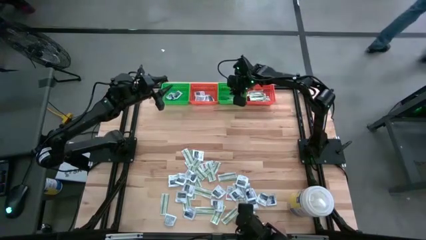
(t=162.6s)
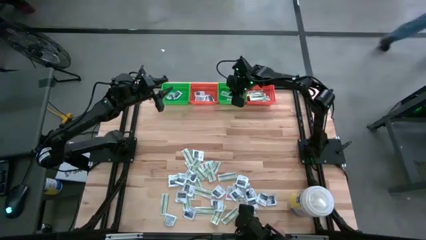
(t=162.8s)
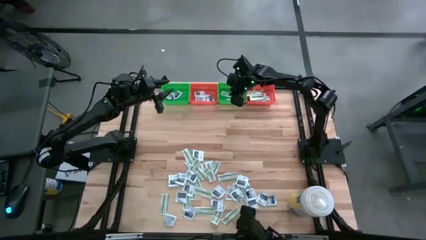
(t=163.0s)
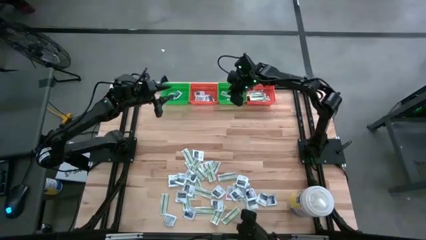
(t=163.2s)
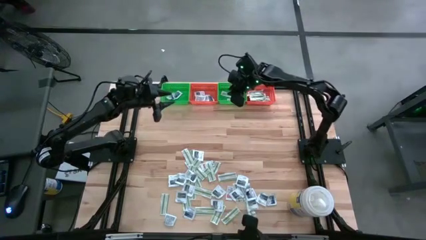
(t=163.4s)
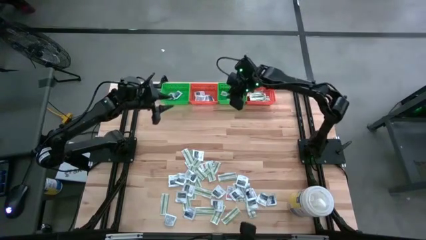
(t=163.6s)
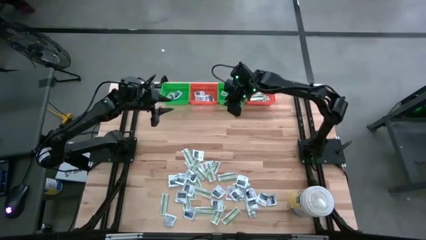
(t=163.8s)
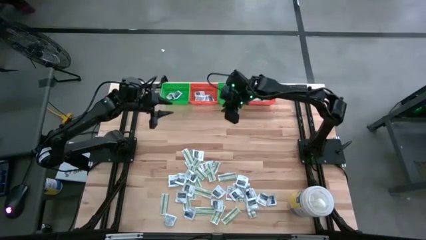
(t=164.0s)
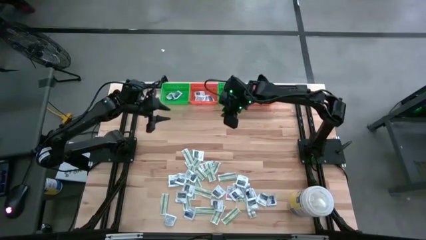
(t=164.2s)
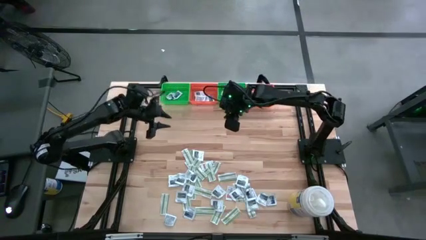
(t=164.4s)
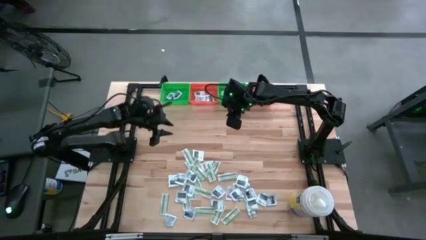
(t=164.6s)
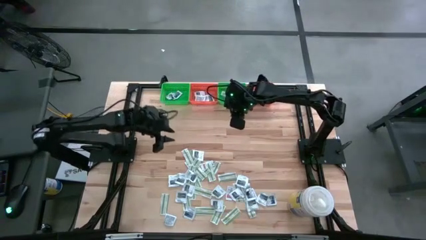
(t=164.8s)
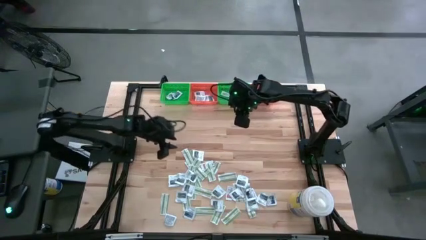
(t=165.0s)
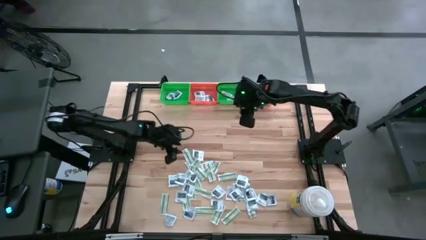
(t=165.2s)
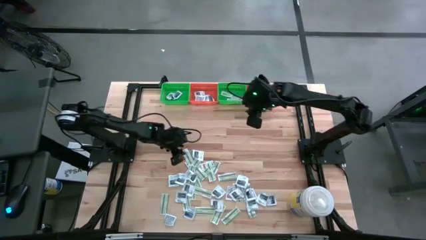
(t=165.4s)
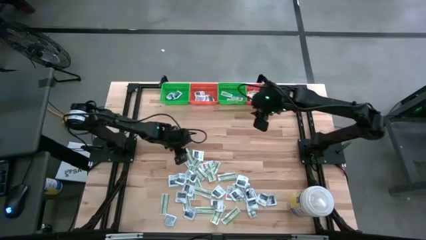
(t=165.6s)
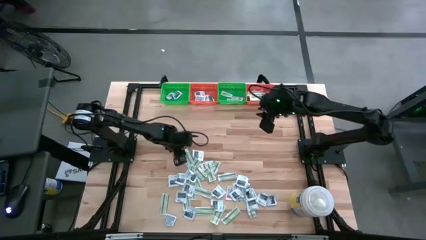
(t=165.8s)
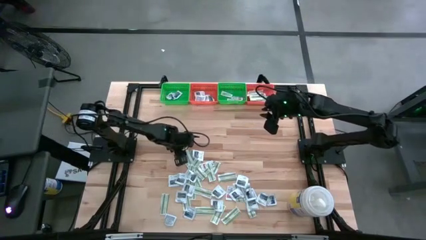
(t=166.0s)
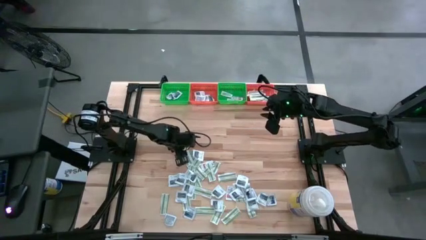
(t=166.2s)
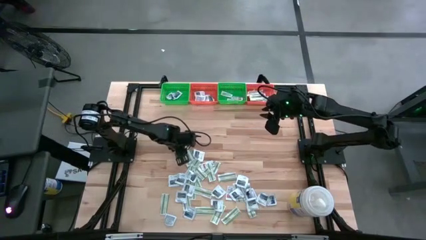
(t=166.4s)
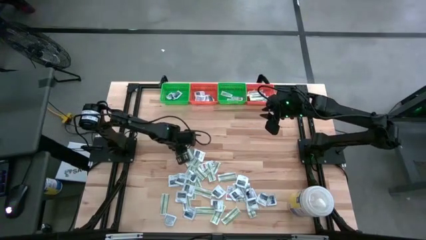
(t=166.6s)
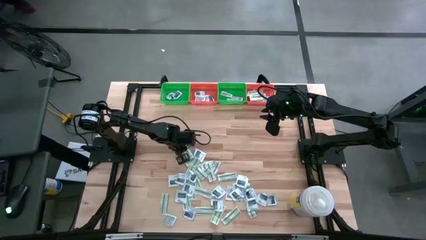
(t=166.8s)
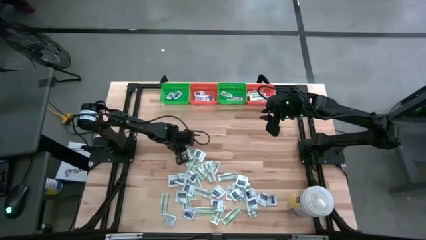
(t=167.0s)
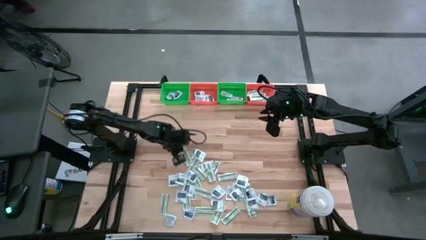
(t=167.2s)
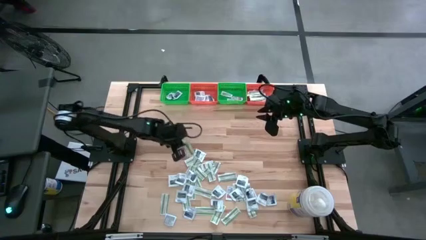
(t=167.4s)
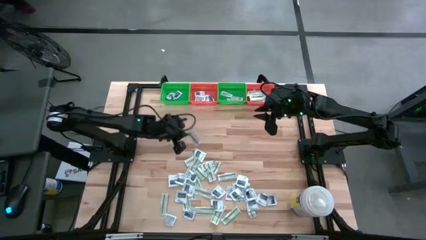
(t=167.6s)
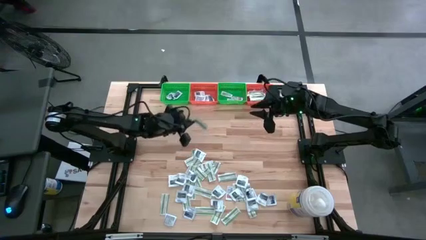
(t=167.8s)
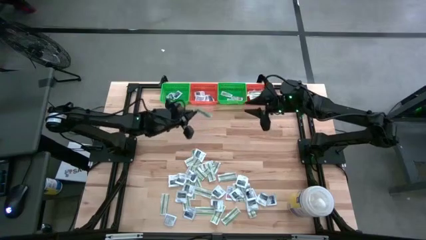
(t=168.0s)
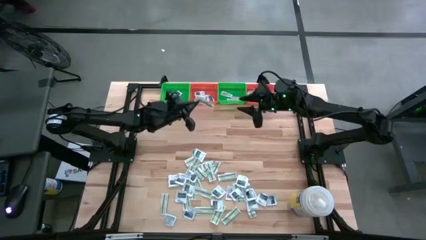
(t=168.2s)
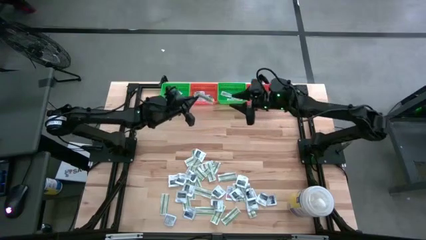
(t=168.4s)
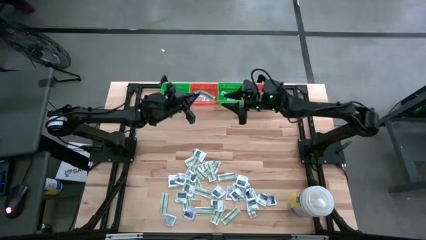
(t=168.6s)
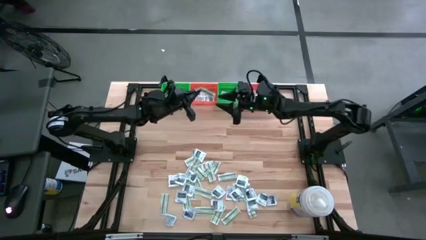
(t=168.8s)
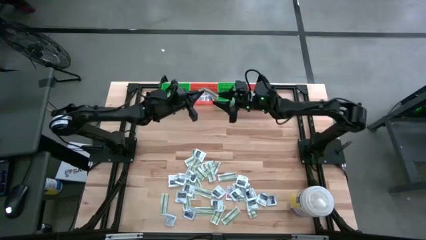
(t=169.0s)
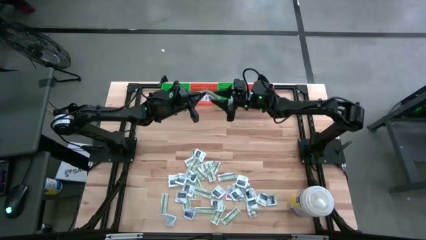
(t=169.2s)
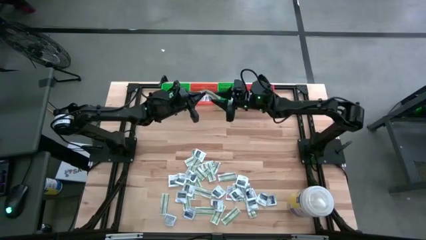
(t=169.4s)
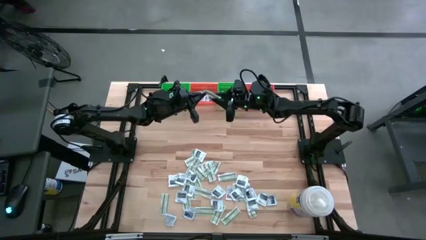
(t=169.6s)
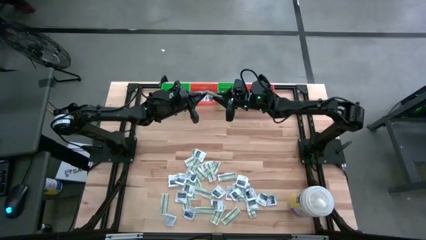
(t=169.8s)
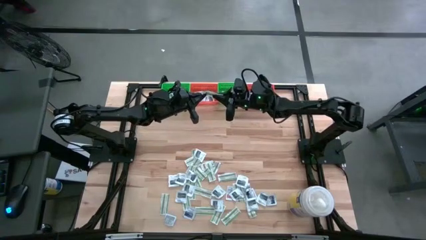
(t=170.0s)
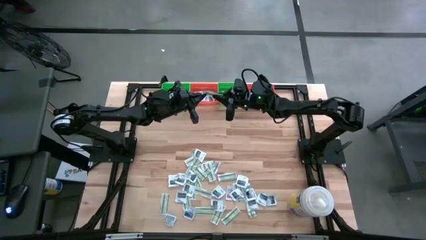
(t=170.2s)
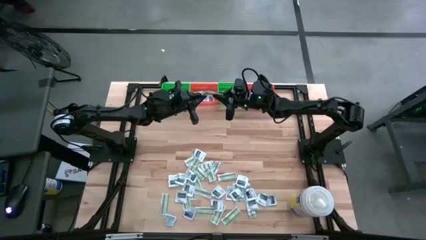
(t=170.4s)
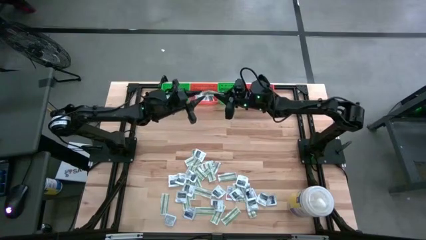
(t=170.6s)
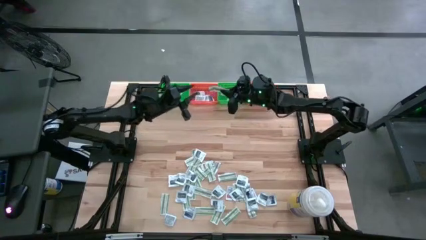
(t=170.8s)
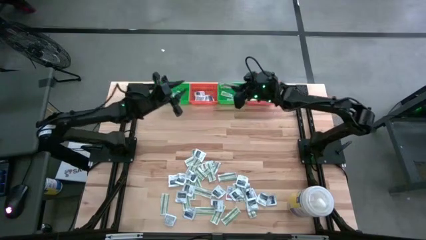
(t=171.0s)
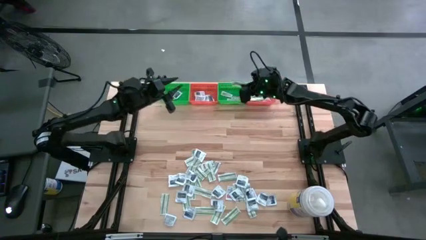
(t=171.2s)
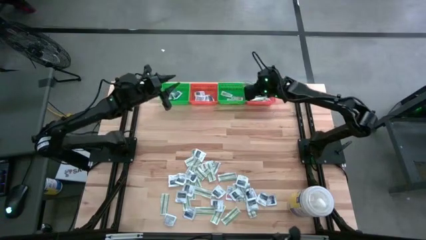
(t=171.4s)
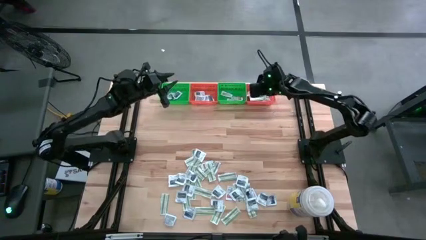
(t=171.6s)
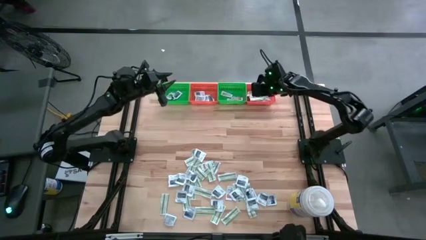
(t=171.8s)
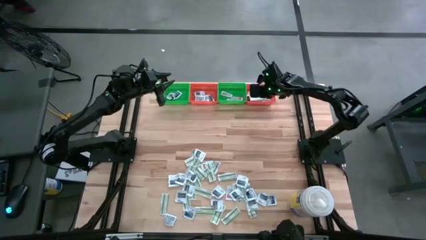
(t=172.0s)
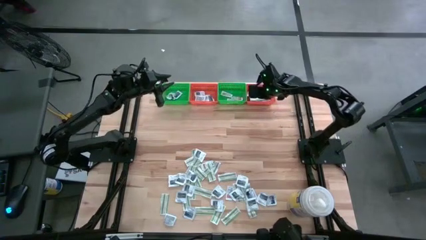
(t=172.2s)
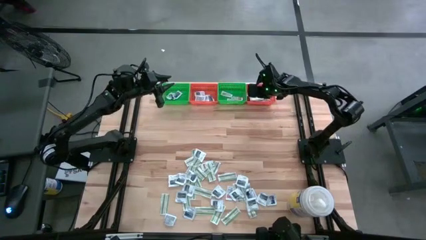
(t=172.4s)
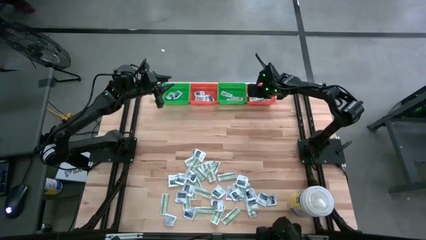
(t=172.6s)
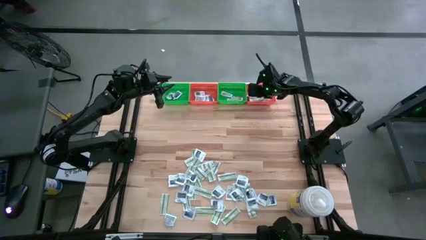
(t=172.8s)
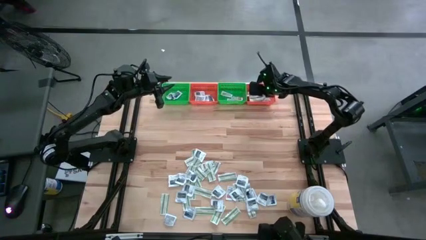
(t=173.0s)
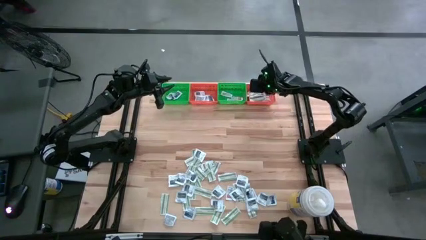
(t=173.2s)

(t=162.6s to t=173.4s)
Task: Pick & Place First Aid Supplies
Put the green bandage pack in the right orange bin

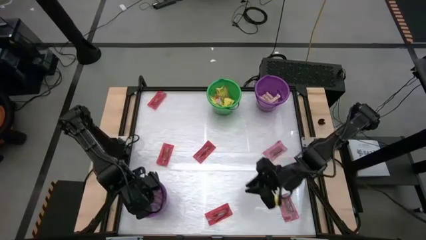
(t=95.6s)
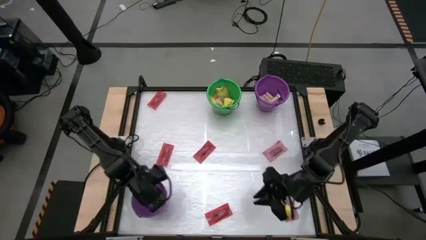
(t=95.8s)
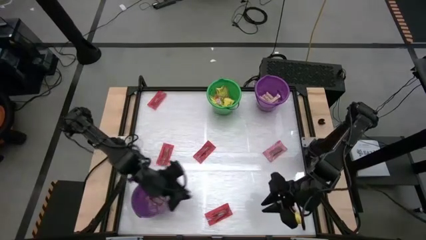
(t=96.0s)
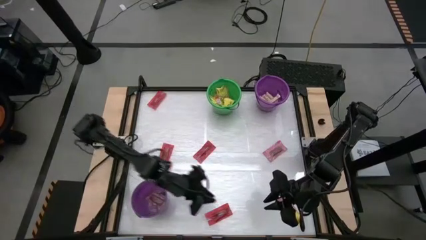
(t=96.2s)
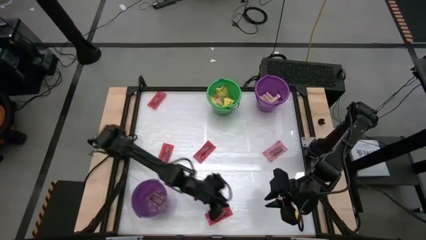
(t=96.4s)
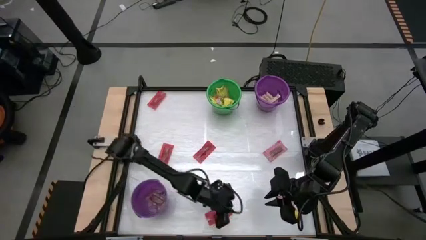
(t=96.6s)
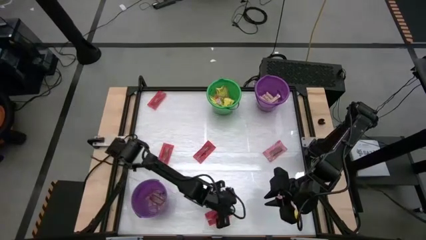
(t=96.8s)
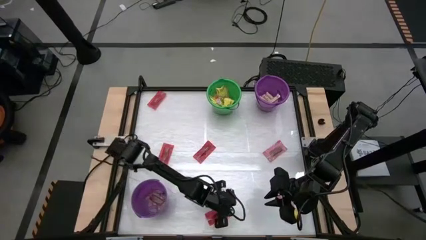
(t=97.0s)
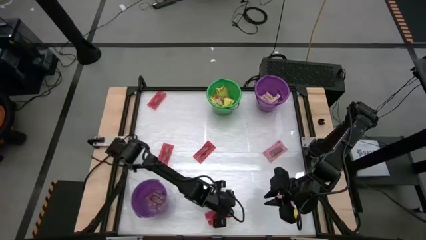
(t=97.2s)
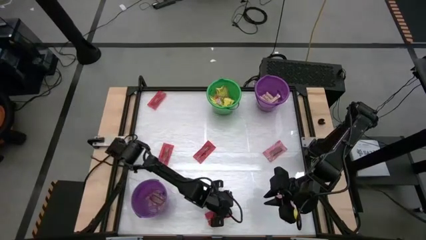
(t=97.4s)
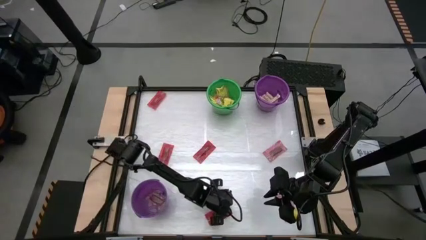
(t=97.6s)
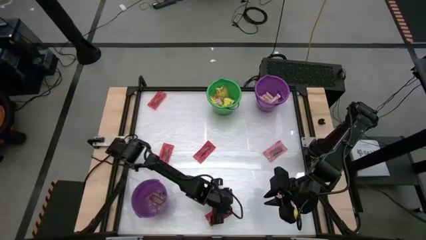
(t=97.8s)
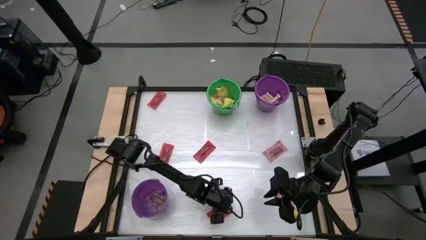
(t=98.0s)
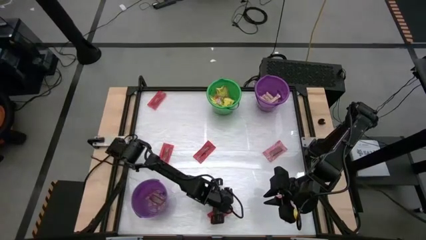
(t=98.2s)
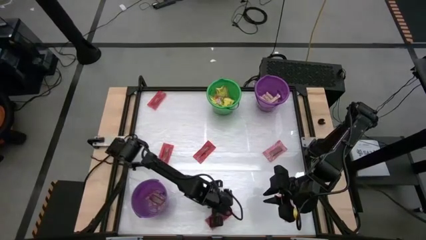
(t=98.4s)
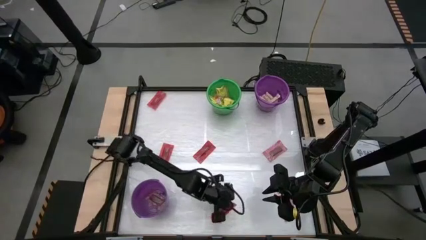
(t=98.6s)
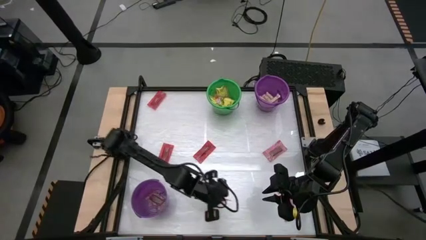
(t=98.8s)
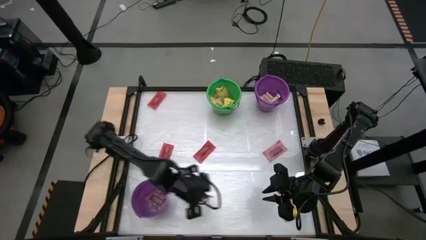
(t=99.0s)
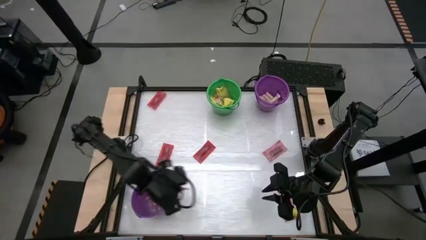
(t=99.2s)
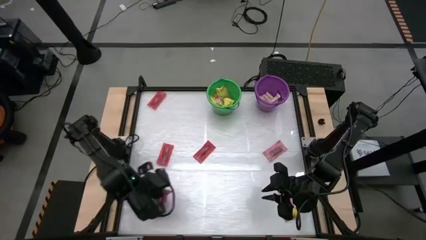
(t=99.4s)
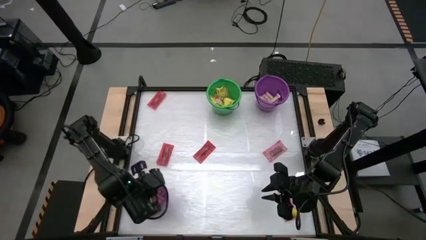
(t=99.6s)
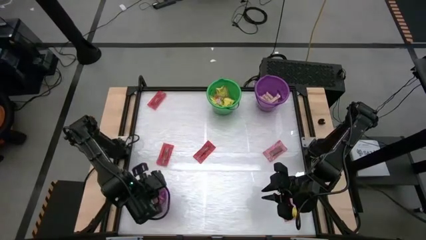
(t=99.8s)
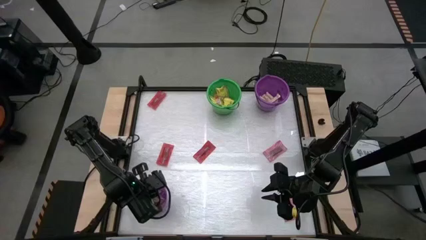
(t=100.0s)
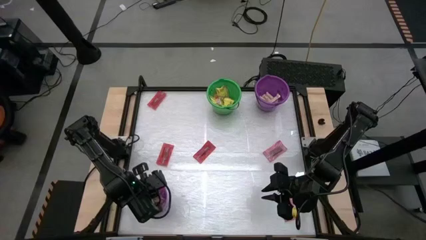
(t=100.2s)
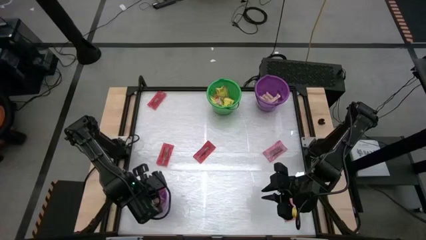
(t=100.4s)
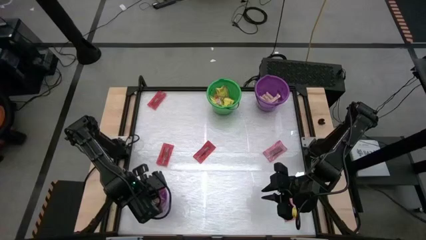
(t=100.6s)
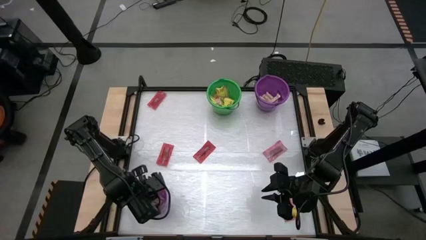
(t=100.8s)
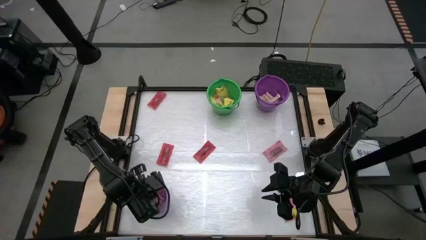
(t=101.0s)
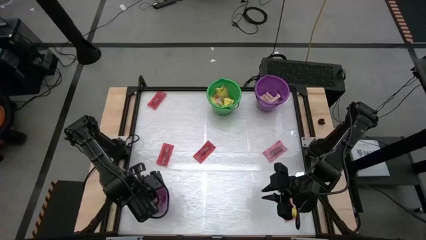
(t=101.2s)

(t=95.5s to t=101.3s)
Task: Sort candy by brand, put in halloween buckets
Put the red candy into the bottom violet bucket
